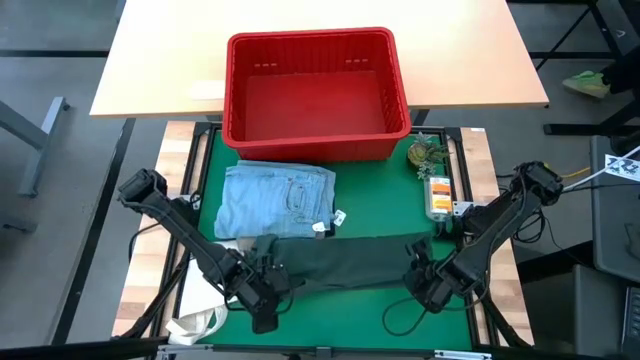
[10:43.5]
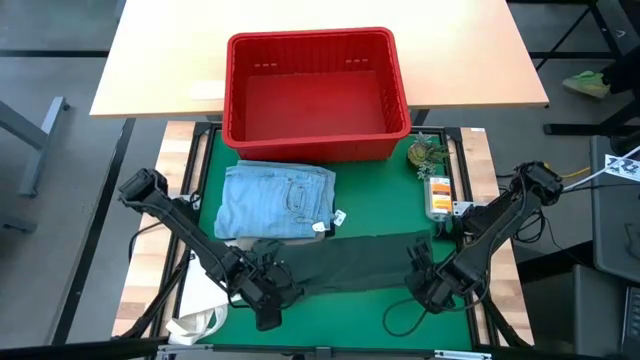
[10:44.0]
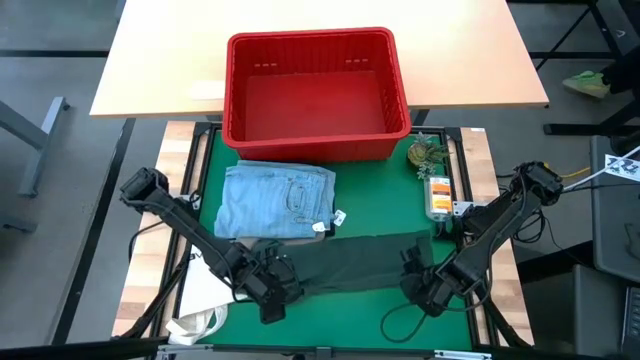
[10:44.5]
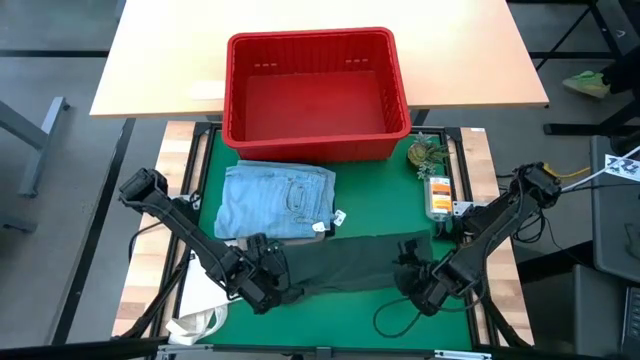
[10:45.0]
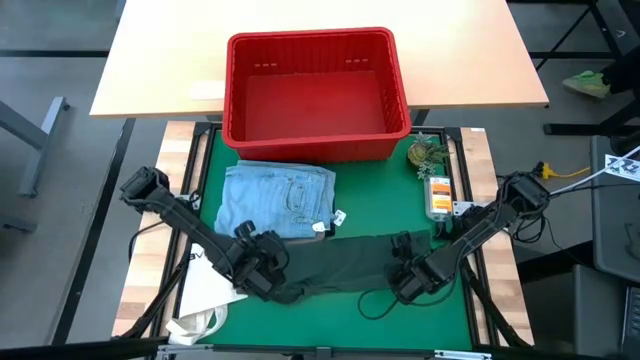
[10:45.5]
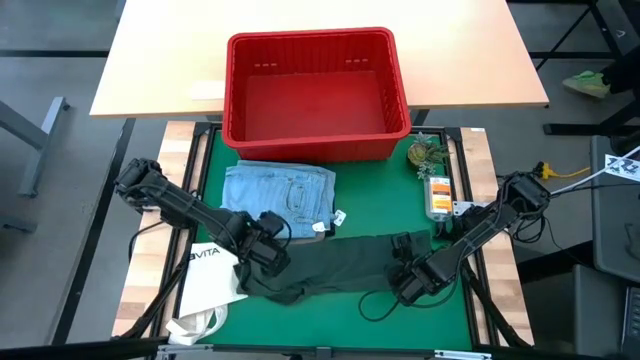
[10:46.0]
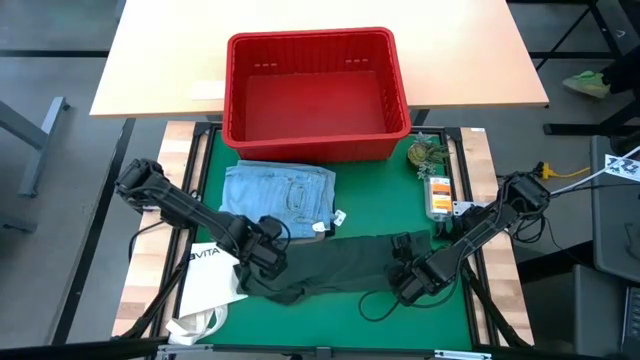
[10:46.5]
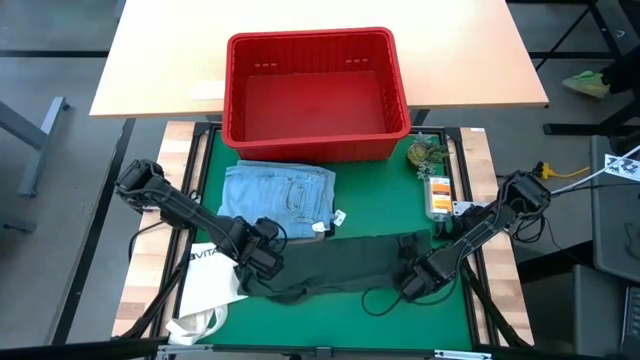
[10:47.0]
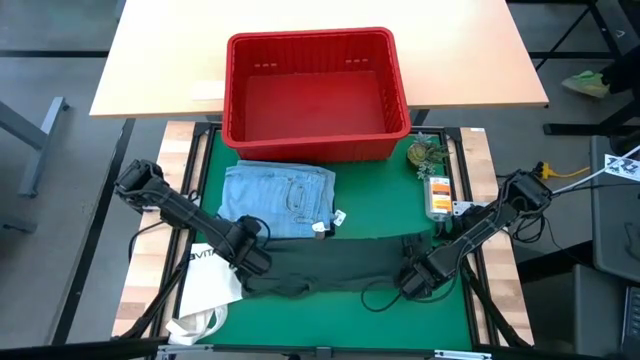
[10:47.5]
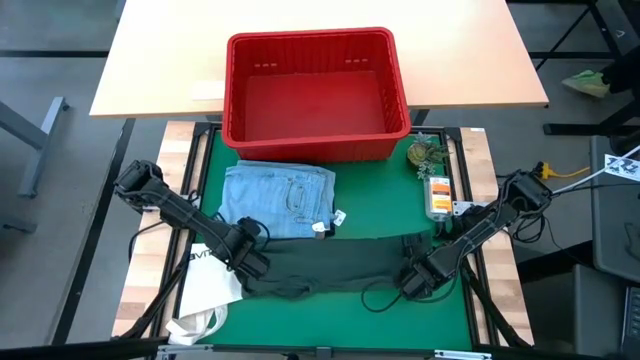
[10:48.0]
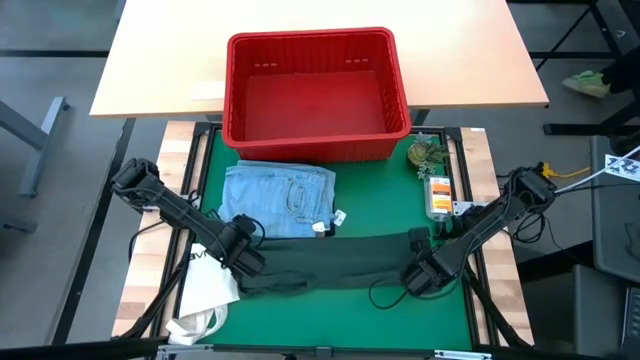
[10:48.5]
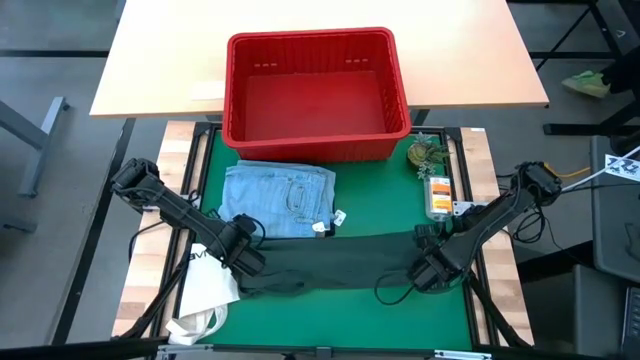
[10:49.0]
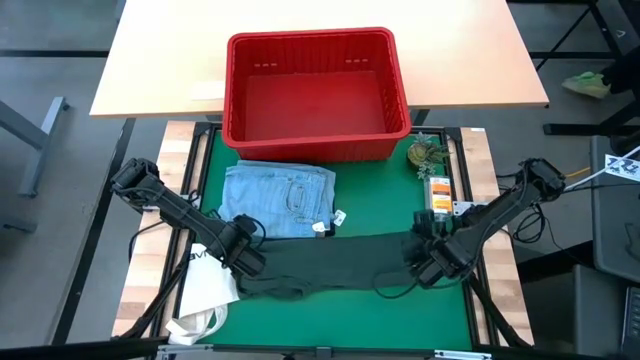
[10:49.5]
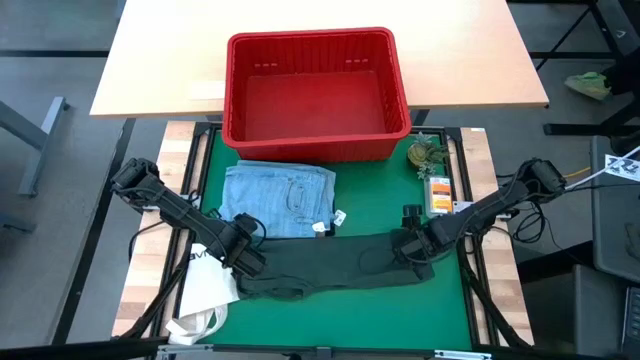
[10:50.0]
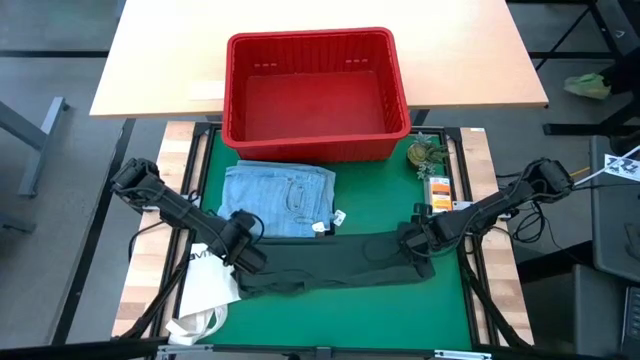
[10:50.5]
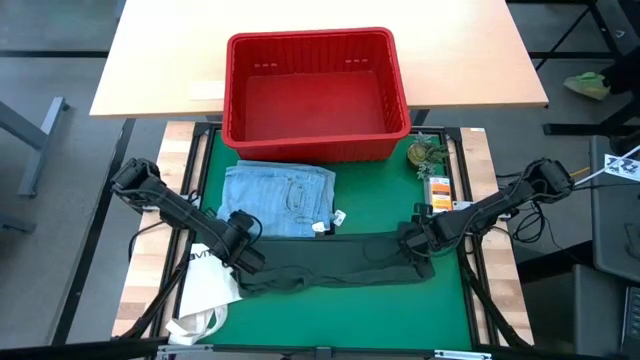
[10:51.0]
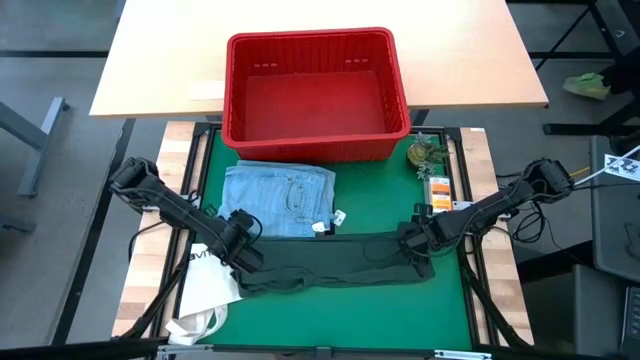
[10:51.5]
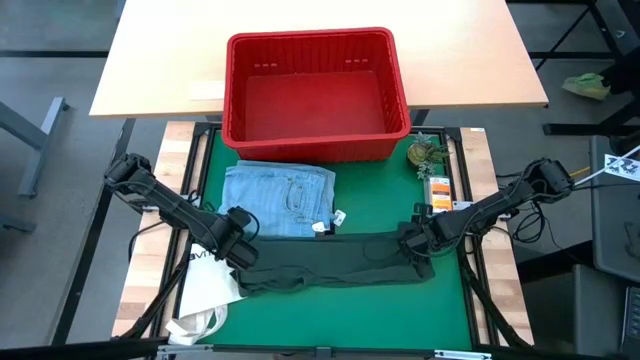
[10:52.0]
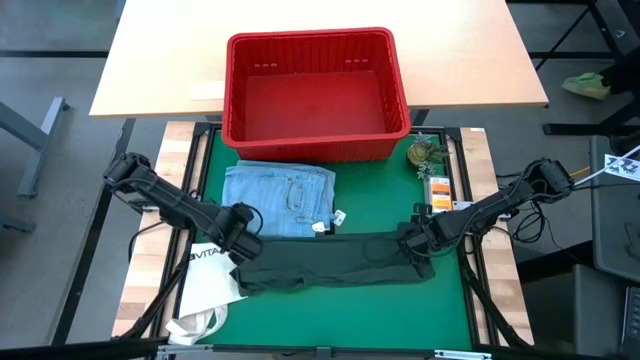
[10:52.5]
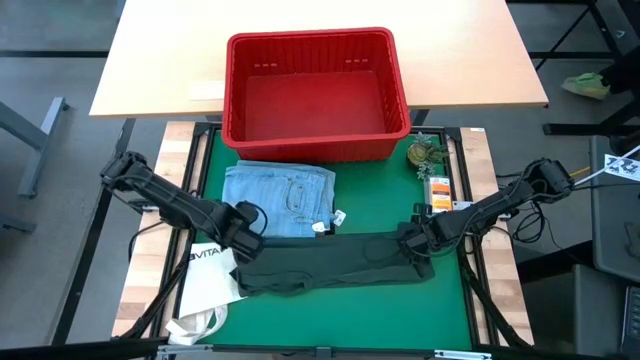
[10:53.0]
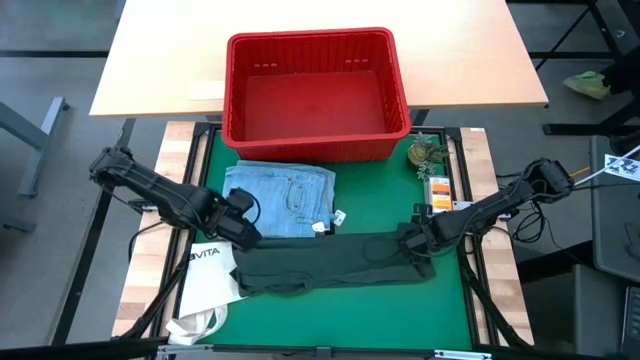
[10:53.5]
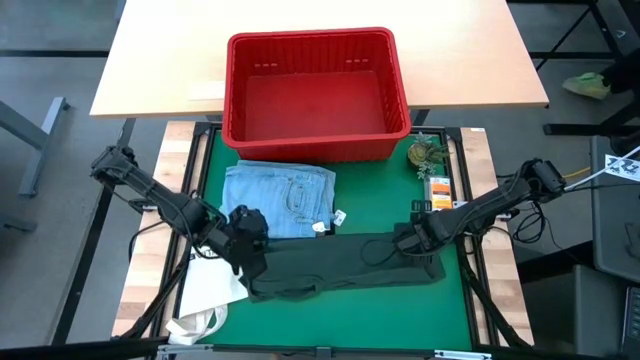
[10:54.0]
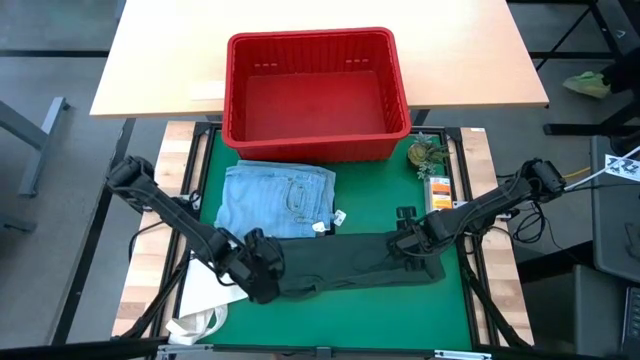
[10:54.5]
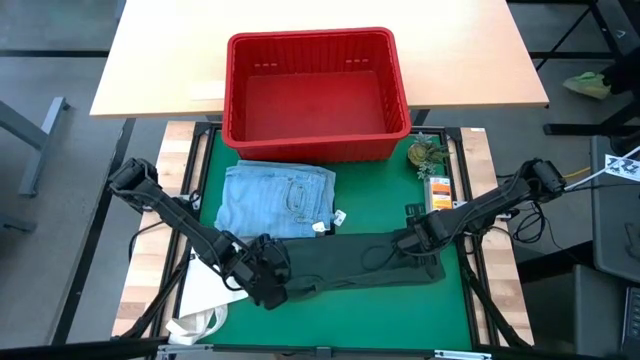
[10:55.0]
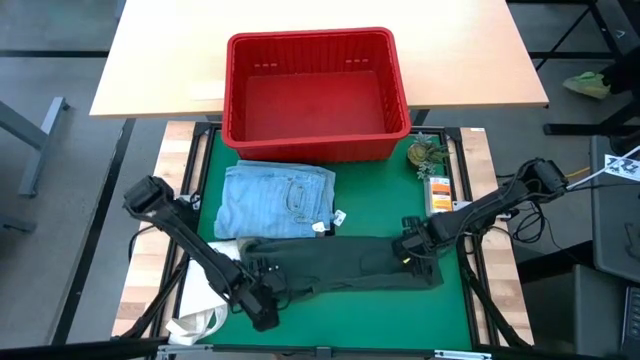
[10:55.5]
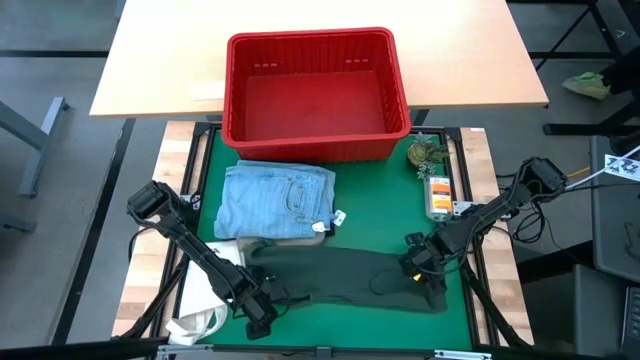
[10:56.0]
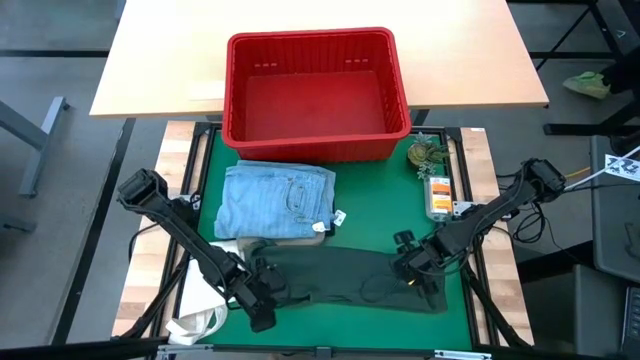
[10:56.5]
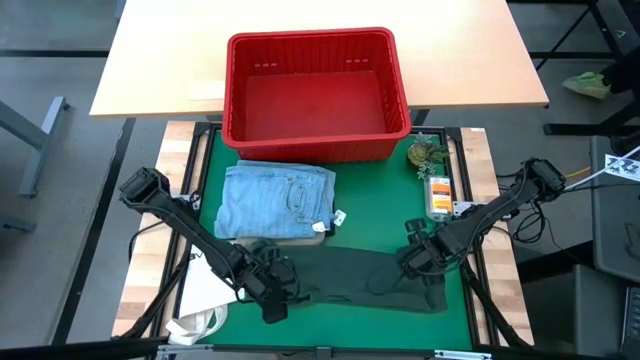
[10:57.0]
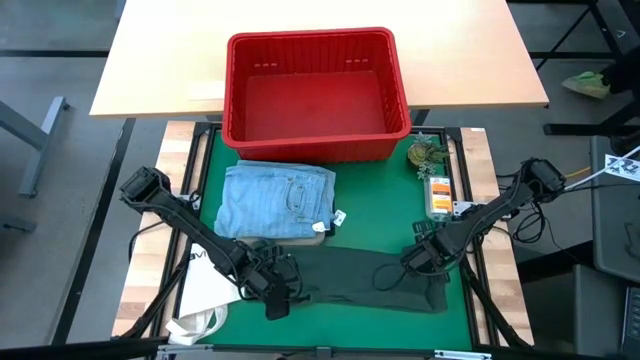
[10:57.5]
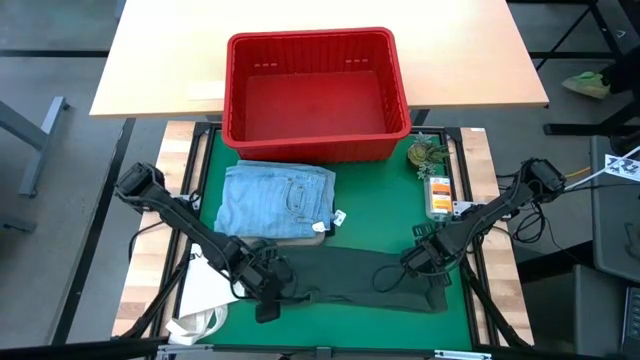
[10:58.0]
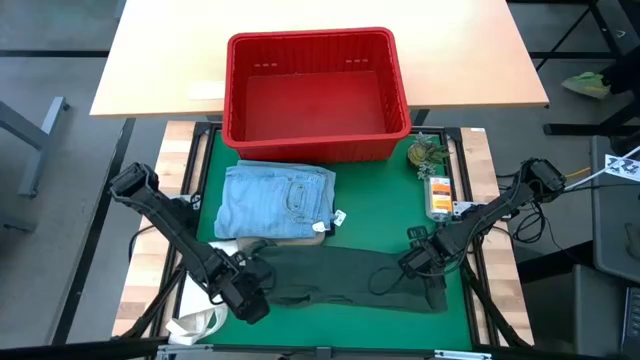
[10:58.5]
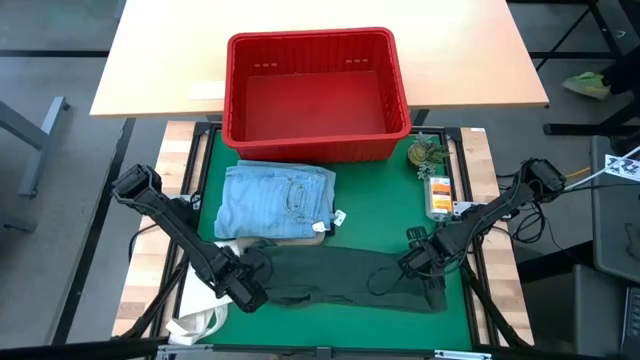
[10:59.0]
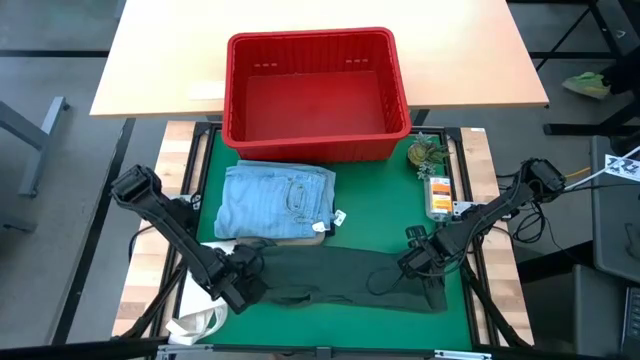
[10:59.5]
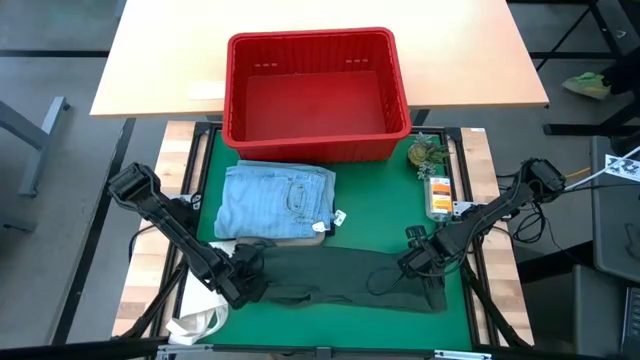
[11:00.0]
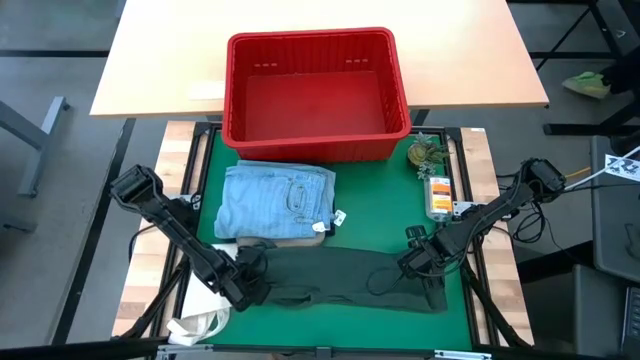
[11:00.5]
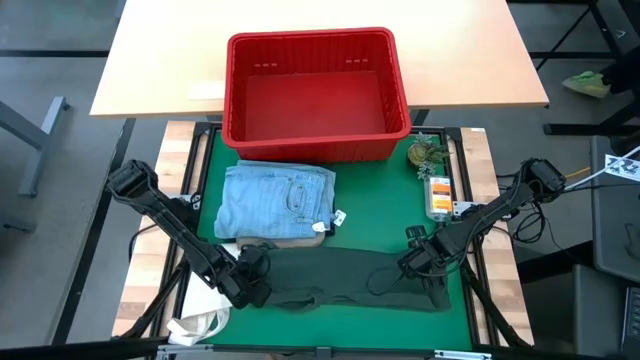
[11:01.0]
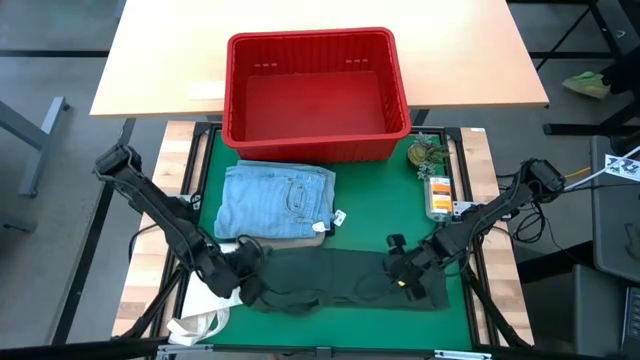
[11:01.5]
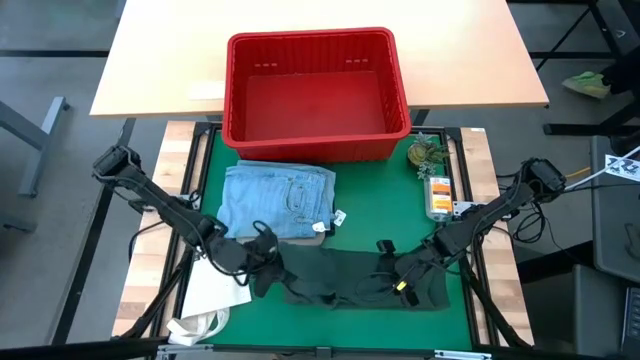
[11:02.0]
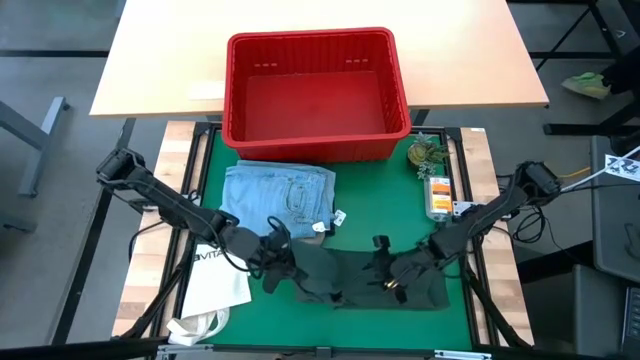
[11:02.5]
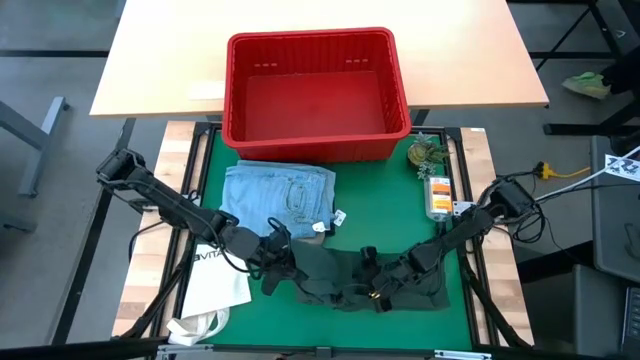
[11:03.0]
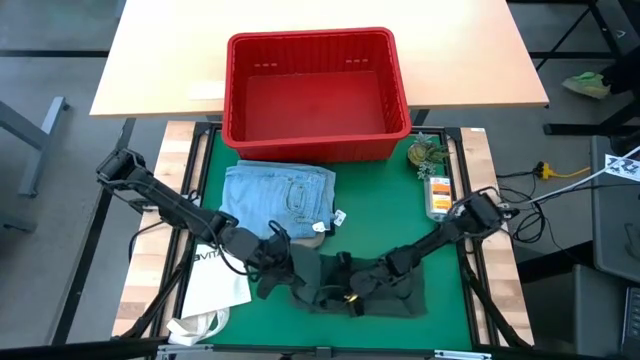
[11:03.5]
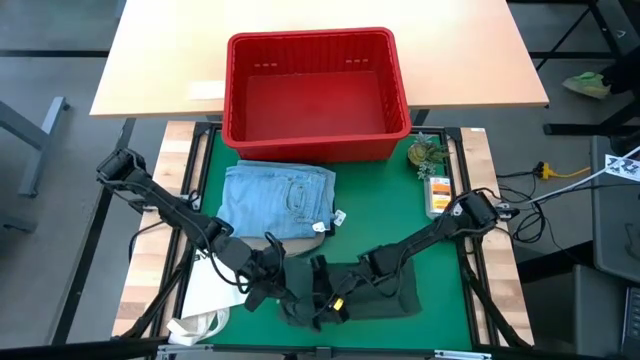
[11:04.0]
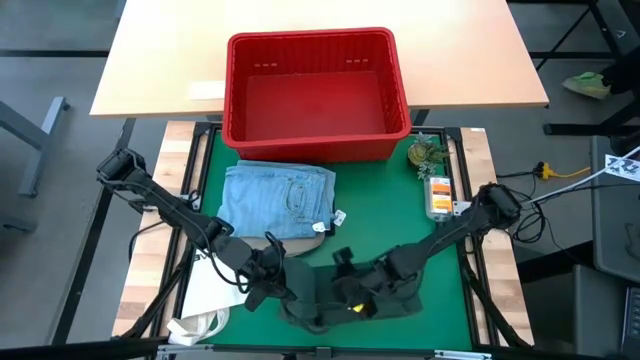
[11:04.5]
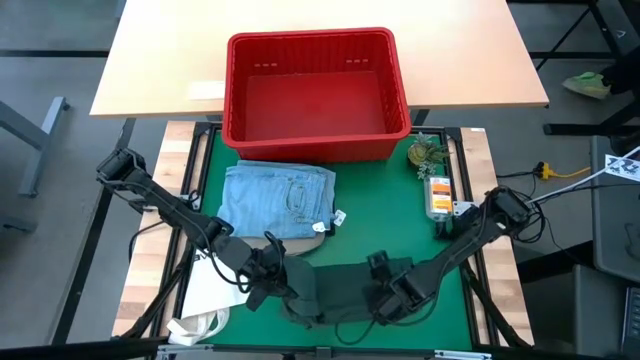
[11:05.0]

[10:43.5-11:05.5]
Task: Fold Laundry from Bin
Fold the green polo shirt
